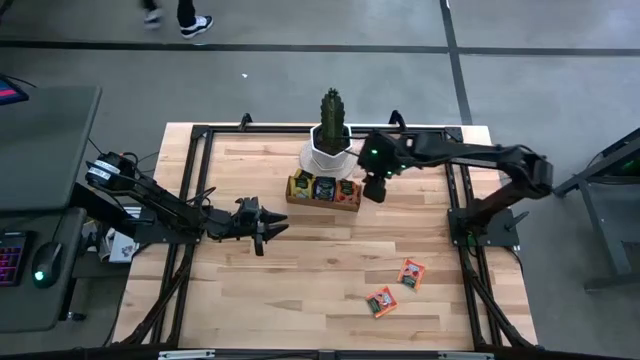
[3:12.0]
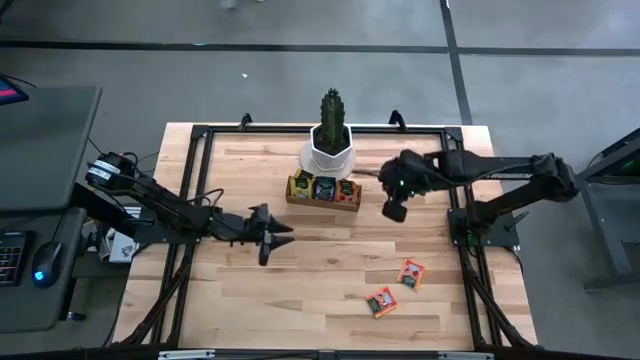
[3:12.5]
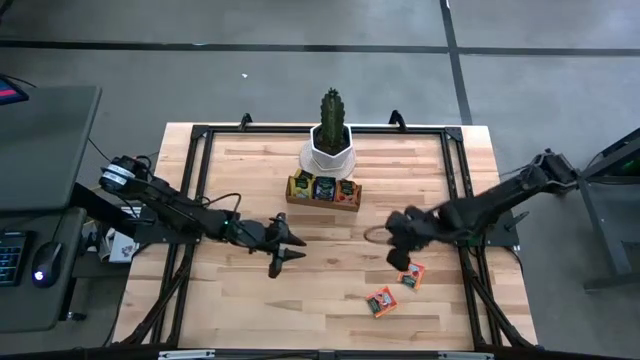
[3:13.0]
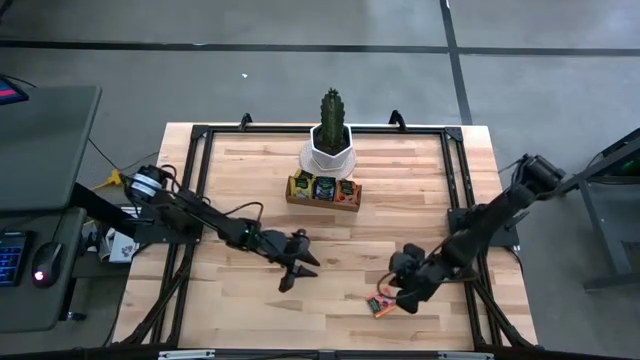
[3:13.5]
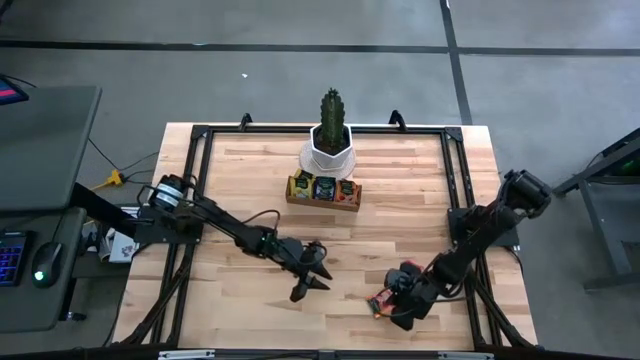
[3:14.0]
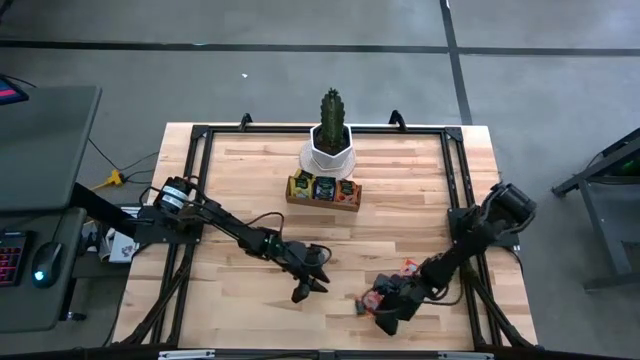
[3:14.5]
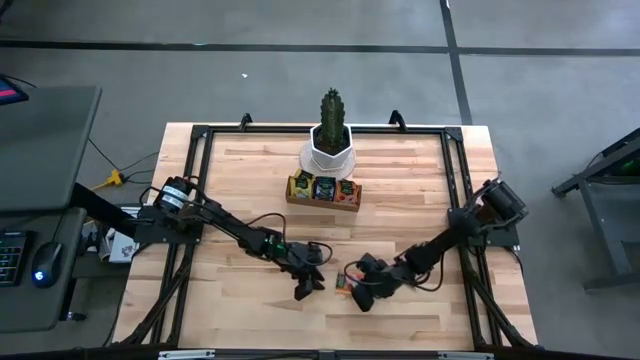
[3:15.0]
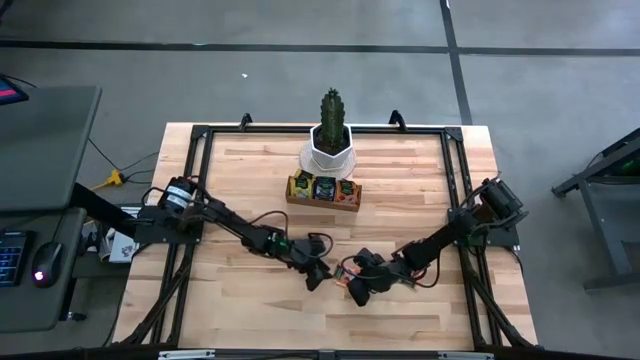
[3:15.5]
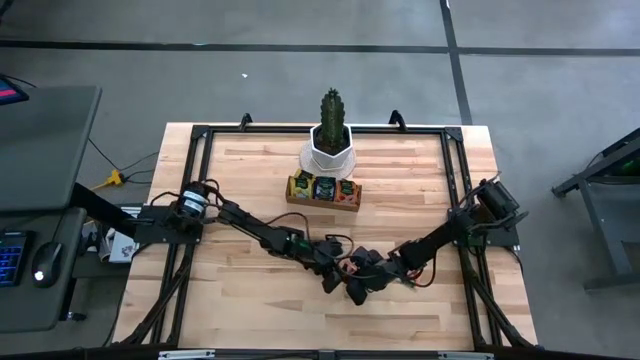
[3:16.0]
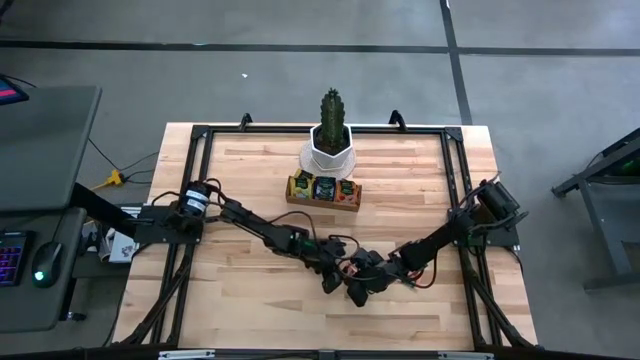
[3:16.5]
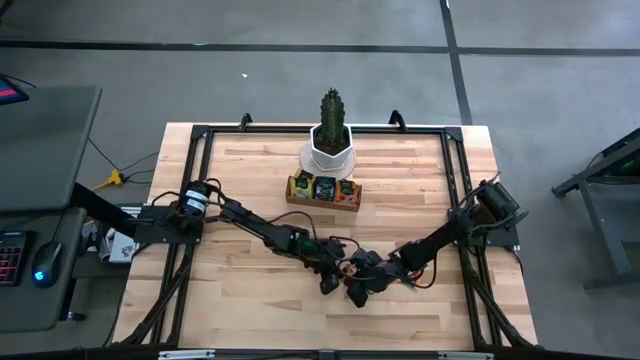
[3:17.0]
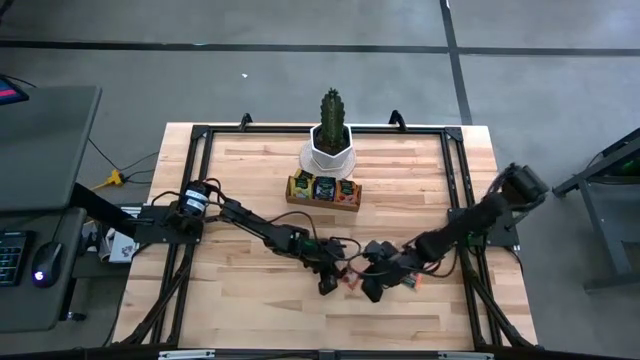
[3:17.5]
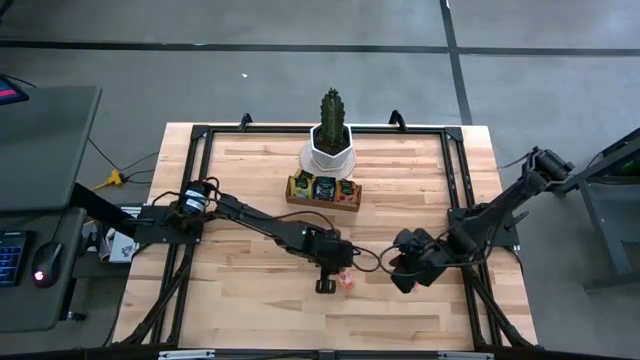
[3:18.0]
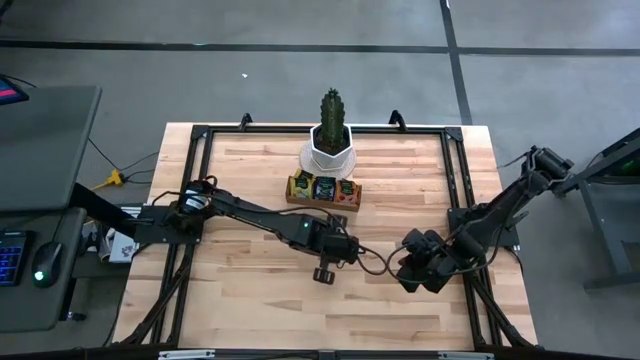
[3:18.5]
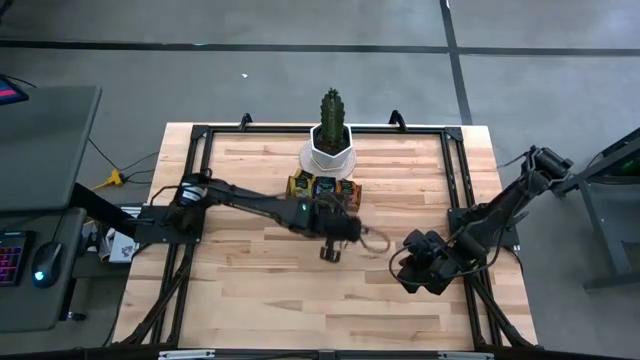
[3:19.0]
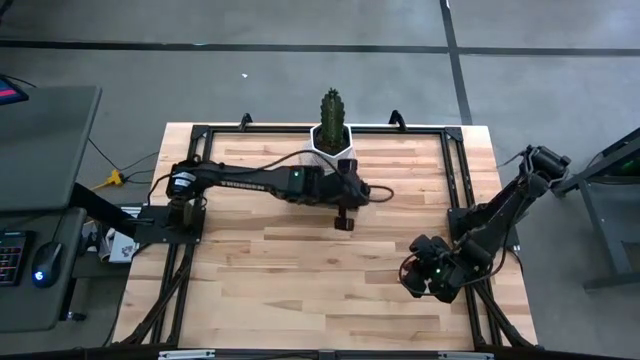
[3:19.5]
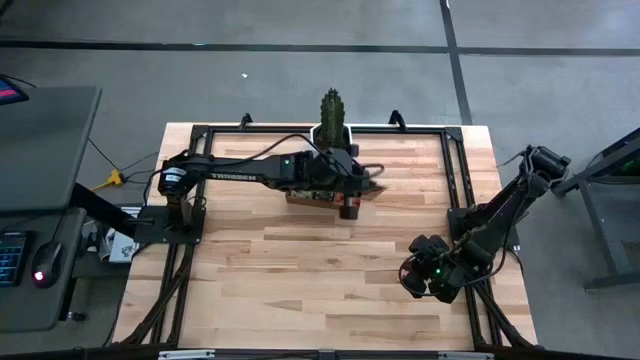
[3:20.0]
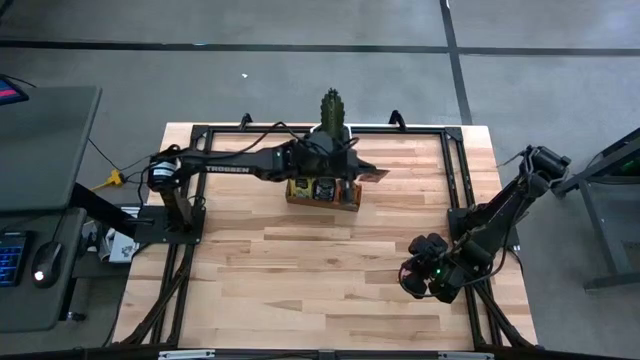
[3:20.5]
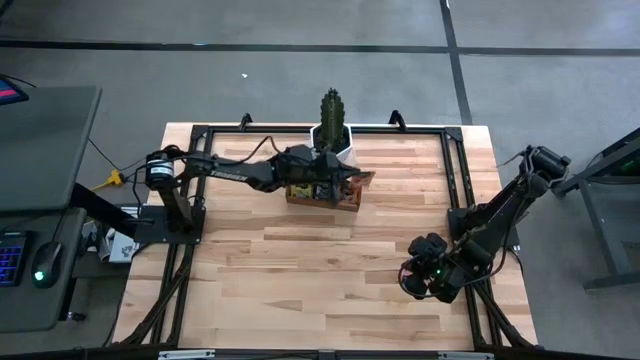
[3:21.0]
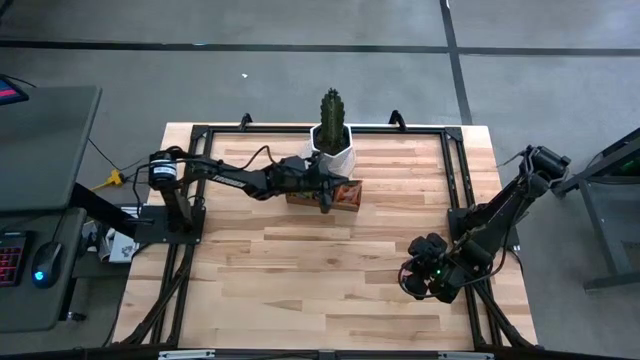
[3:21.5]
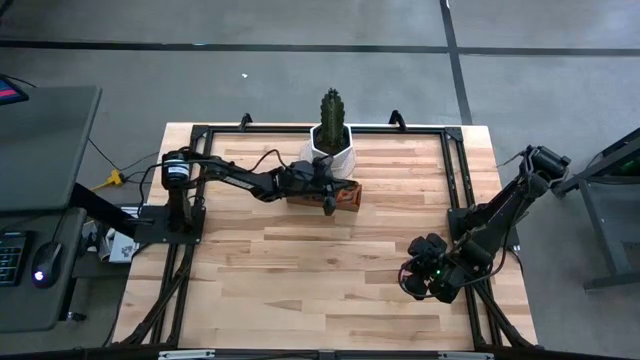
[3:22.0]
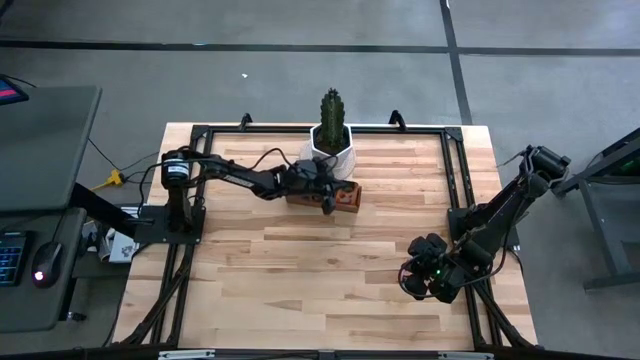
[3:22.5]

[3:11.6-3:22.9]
Task: Pick & Place Tea
Put the orange tea bag into the right section of the wooden organizer

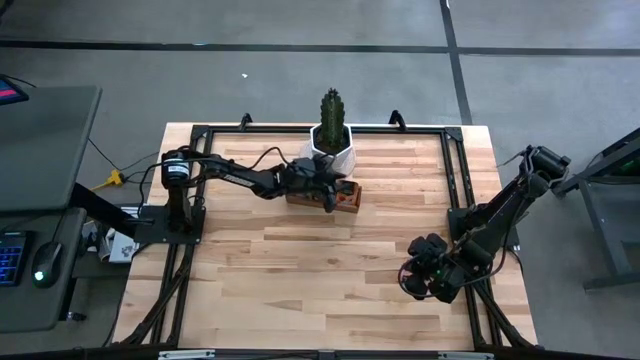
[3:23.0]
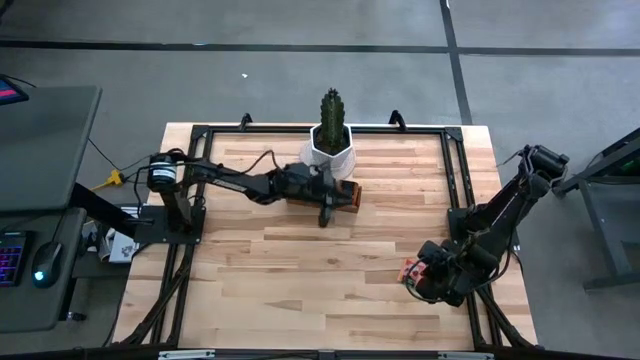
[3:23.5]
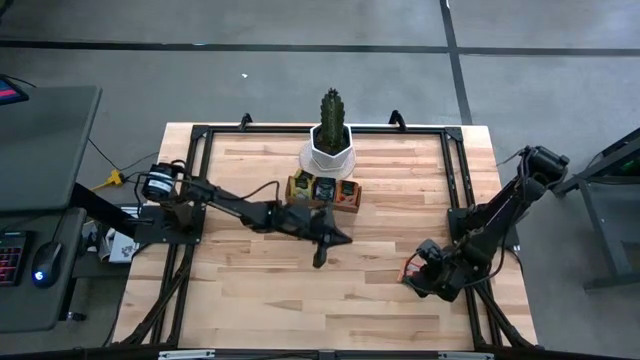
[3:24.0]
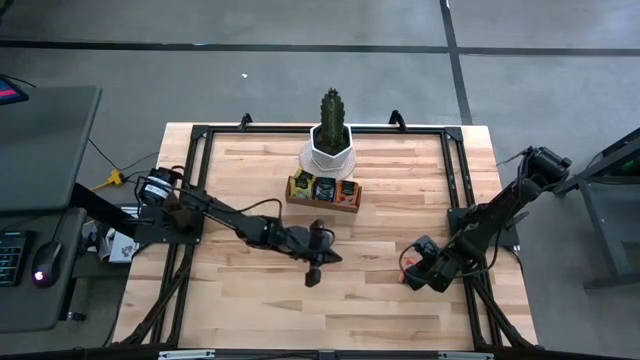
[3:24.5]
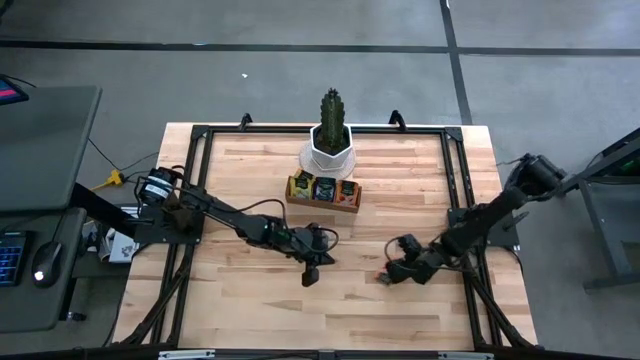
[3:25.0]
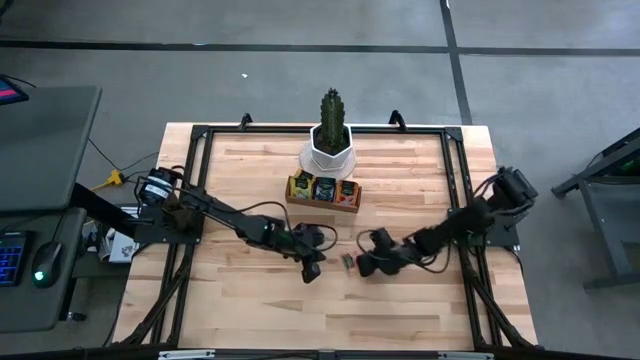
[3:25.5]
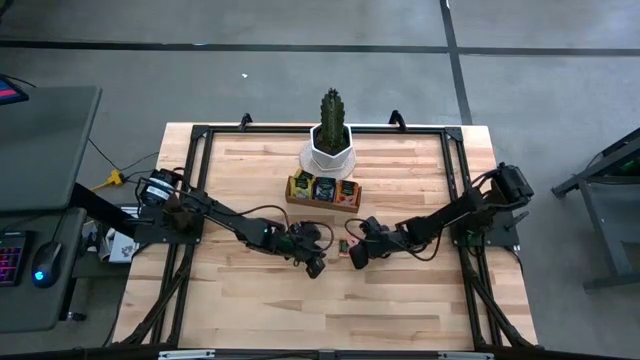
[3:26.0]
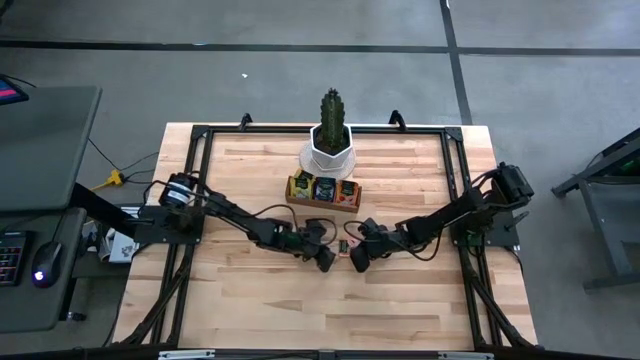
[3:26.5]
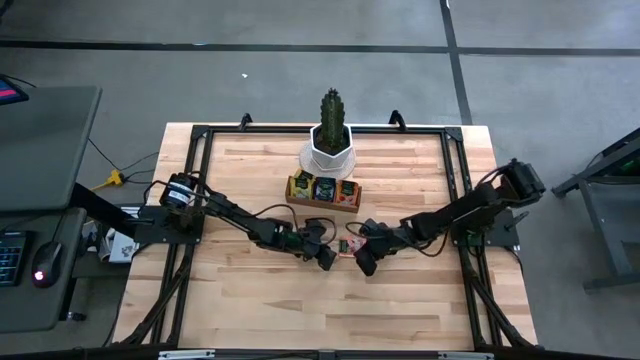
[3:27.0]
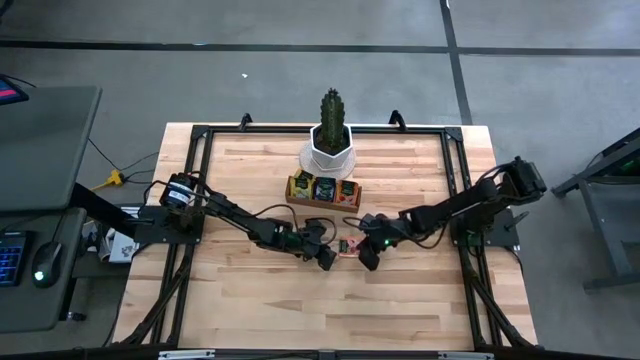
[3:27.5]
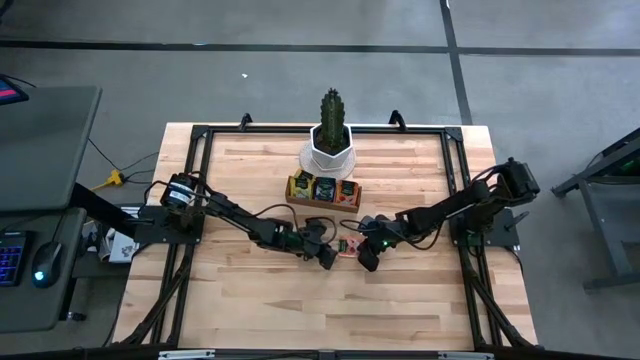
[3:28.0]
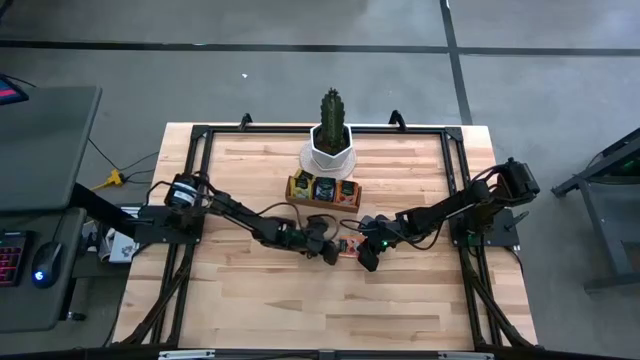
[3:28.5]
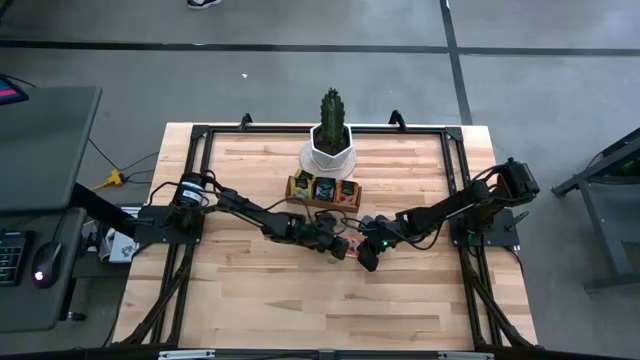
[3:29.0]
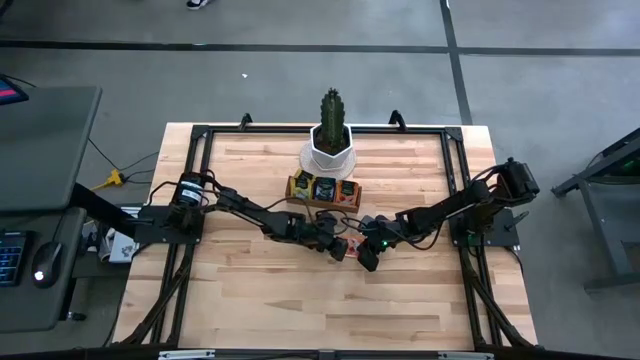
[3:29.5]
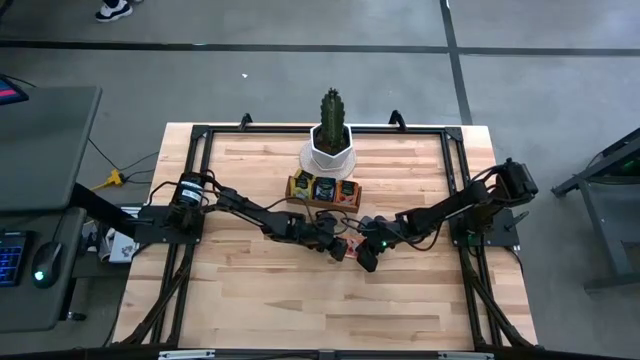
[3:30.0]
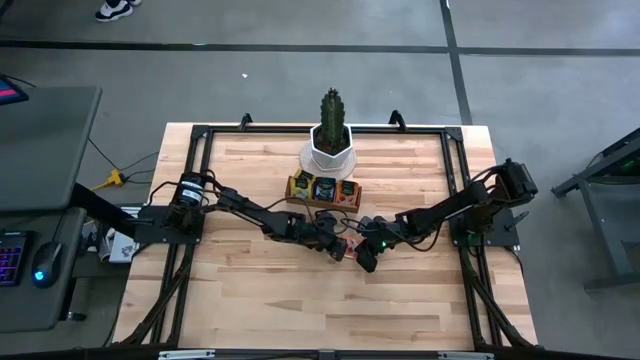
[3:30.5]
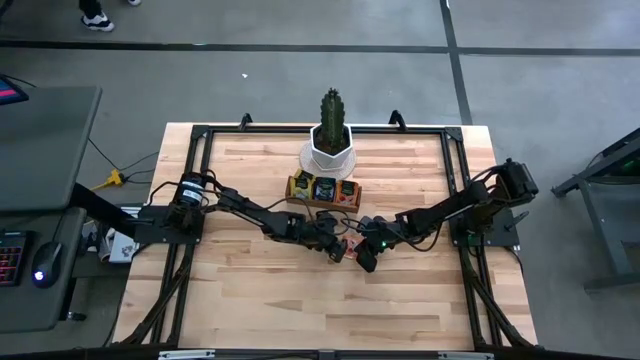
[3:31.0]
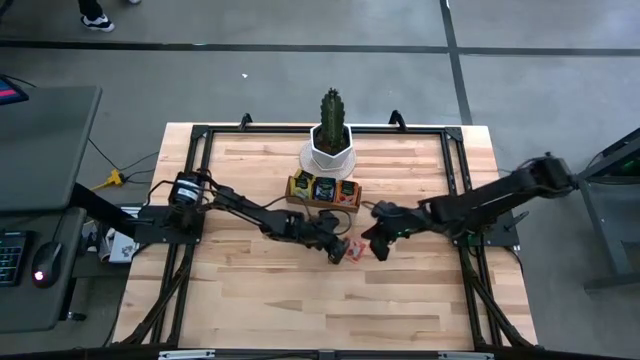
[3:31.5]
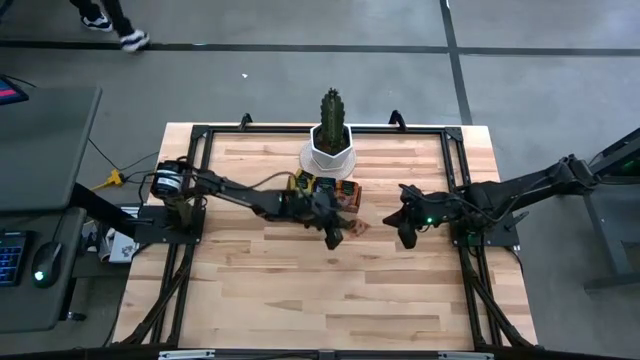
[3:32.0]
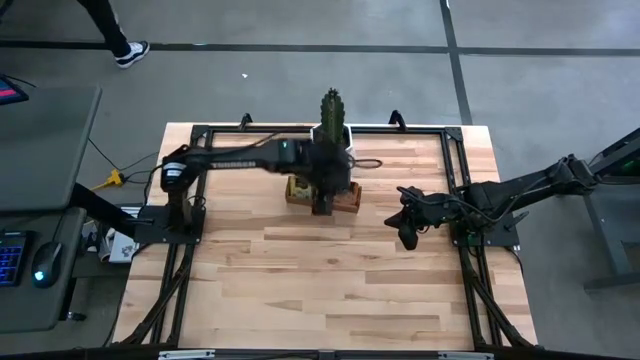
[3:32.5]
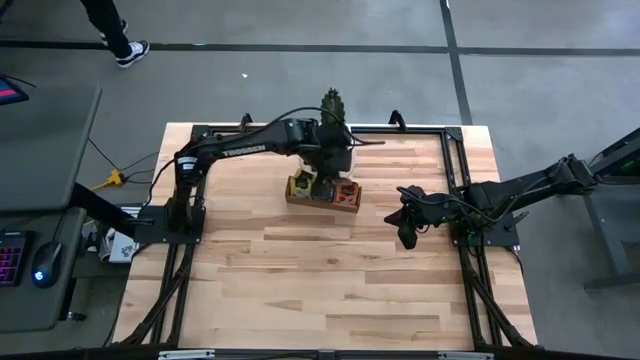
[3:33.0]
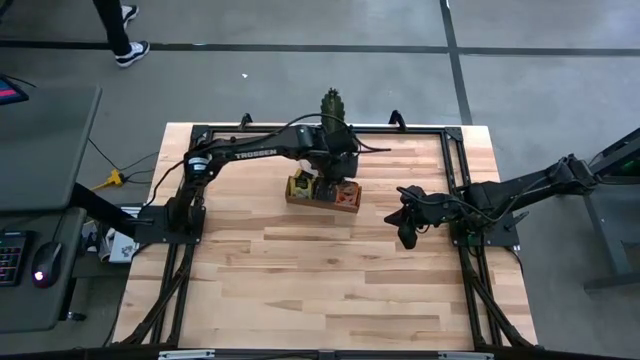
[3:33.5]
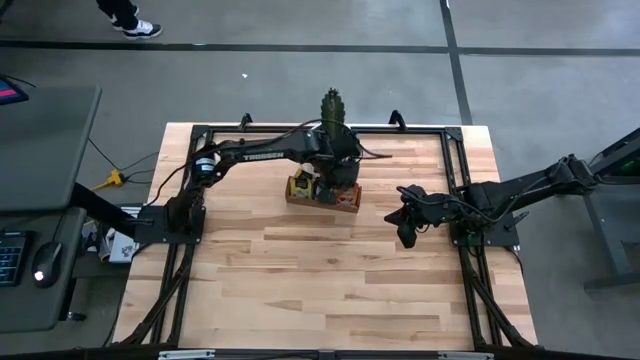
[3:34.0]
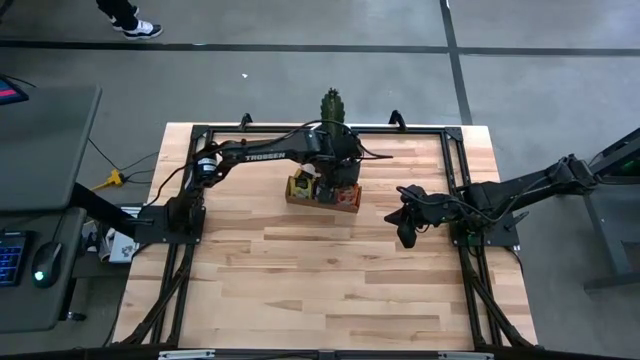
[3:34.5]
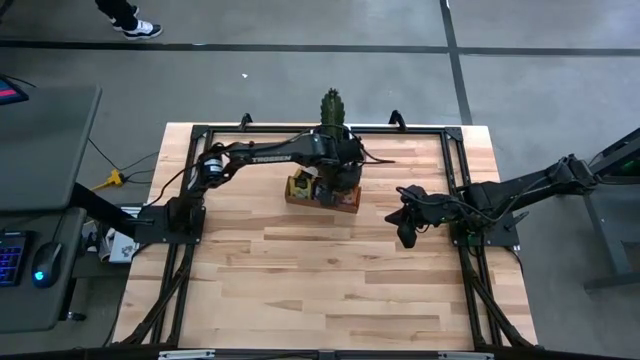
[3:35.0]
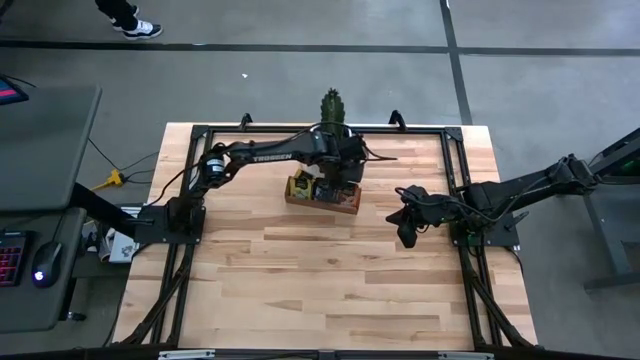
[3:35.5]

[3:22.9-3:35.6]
Put the orange tea bag into the right section of the wooden organizer
